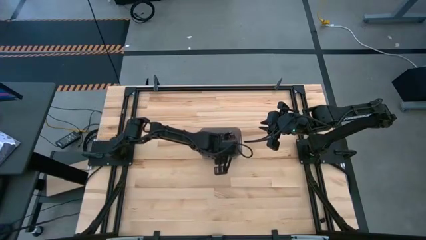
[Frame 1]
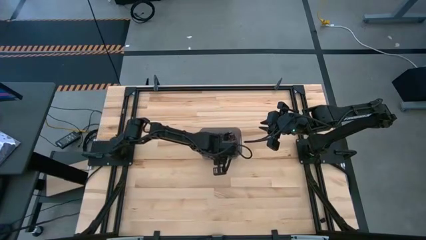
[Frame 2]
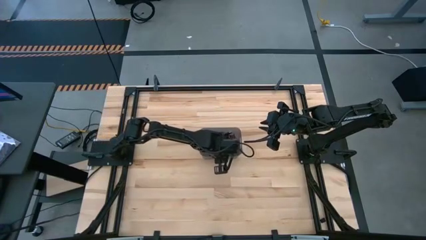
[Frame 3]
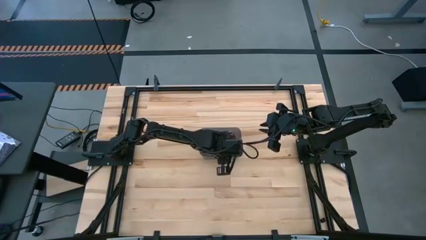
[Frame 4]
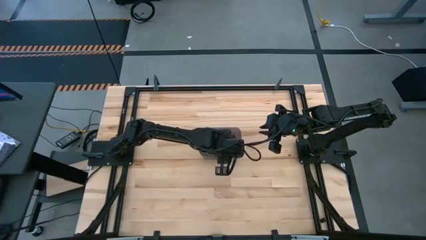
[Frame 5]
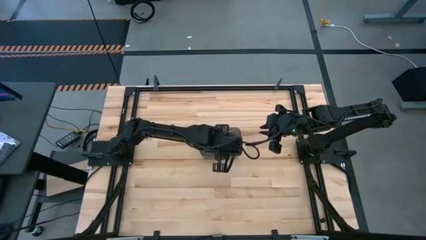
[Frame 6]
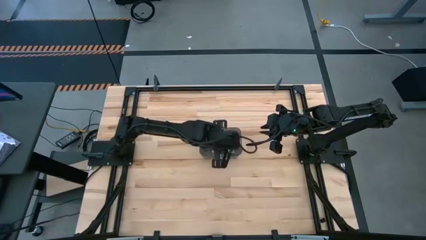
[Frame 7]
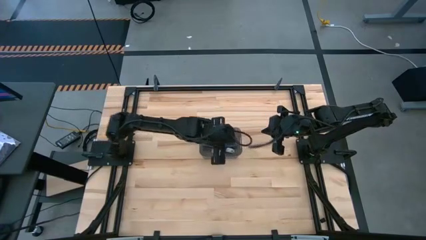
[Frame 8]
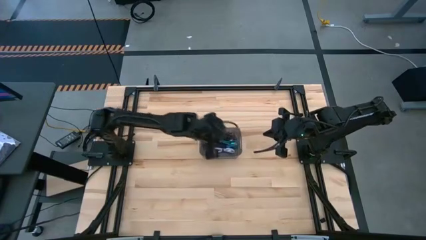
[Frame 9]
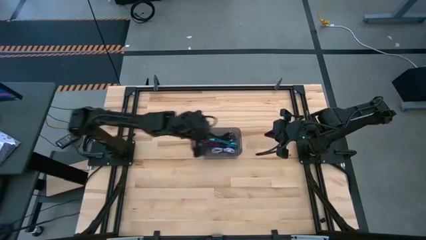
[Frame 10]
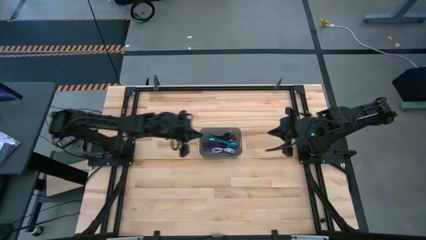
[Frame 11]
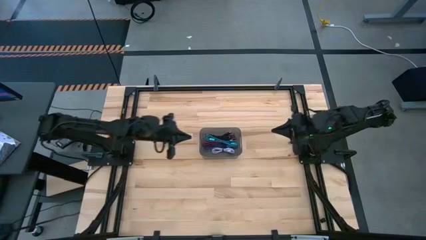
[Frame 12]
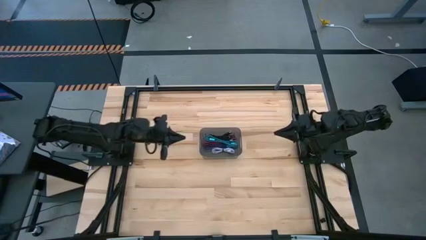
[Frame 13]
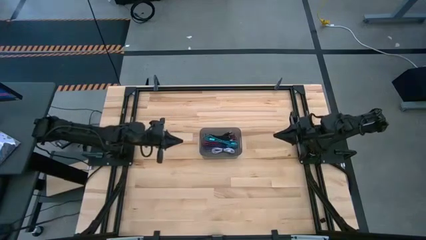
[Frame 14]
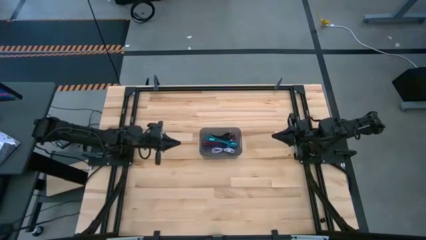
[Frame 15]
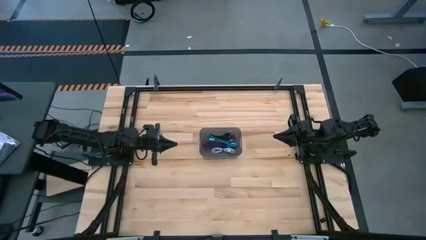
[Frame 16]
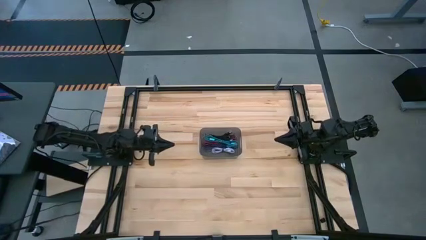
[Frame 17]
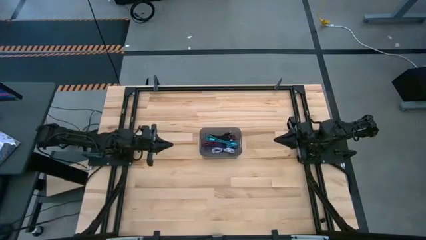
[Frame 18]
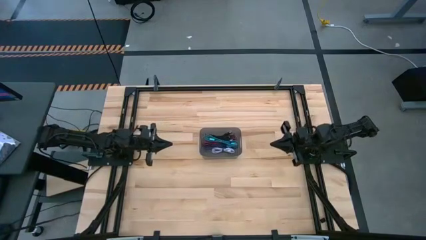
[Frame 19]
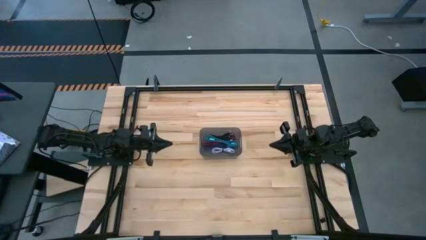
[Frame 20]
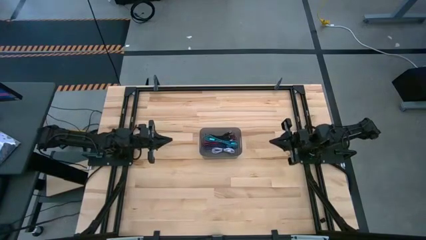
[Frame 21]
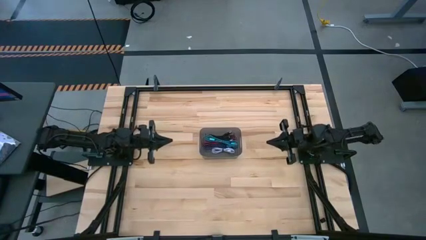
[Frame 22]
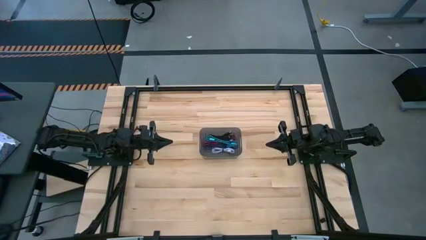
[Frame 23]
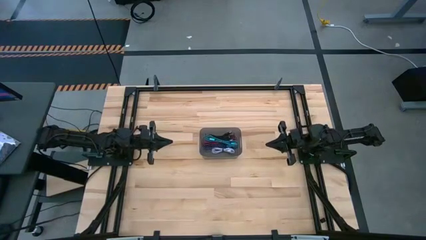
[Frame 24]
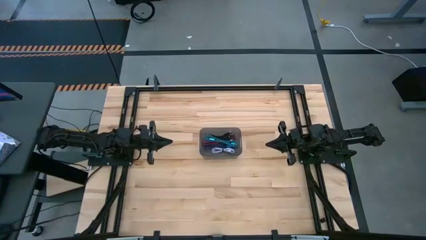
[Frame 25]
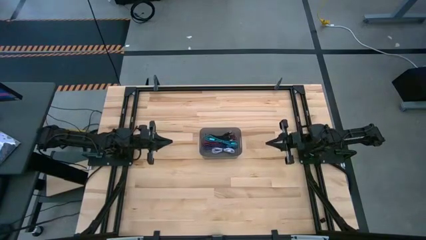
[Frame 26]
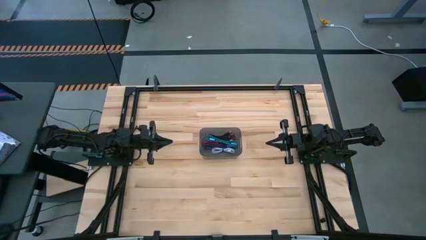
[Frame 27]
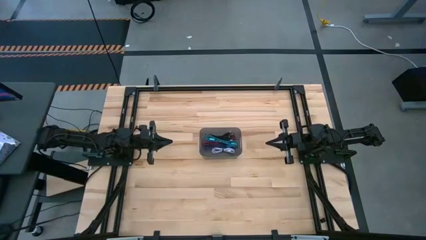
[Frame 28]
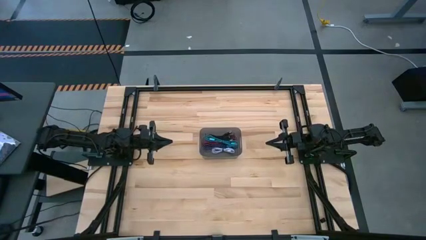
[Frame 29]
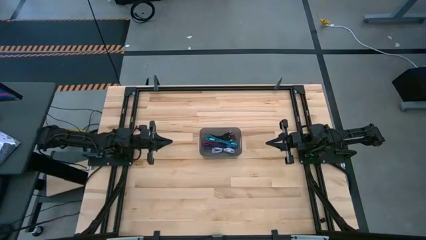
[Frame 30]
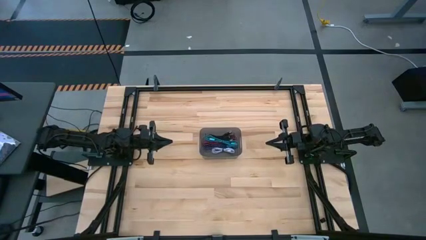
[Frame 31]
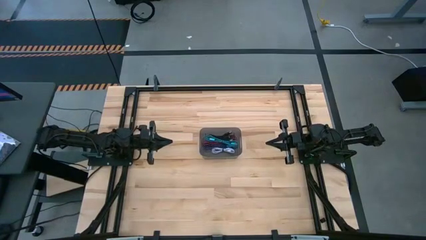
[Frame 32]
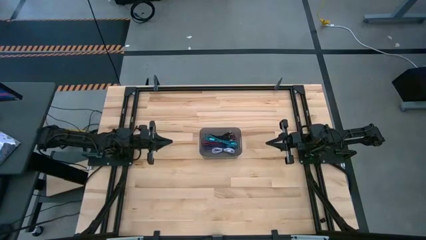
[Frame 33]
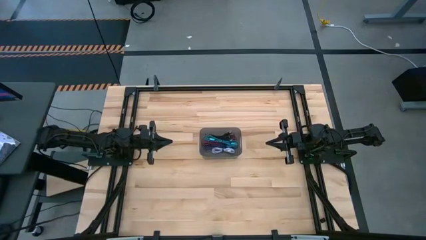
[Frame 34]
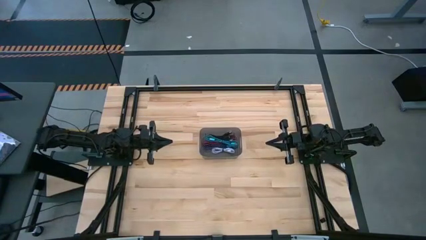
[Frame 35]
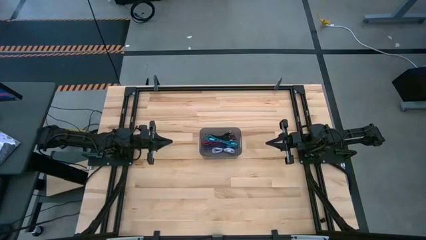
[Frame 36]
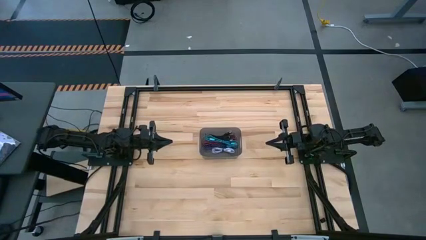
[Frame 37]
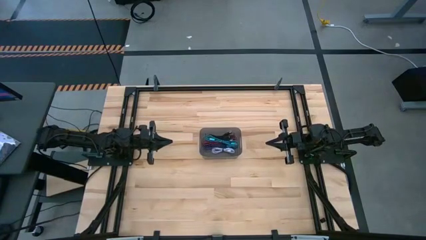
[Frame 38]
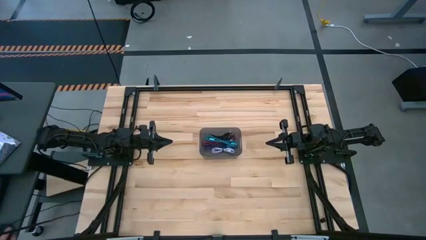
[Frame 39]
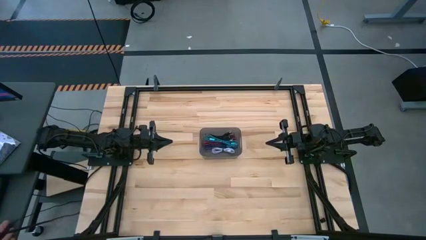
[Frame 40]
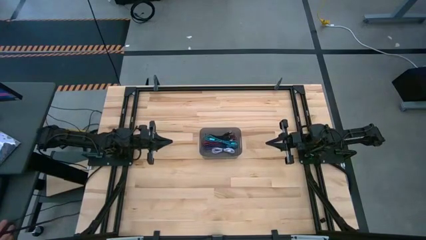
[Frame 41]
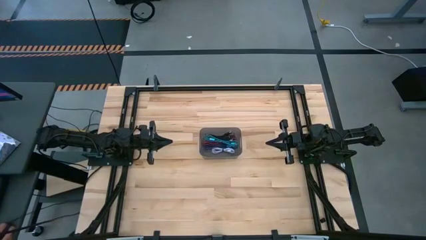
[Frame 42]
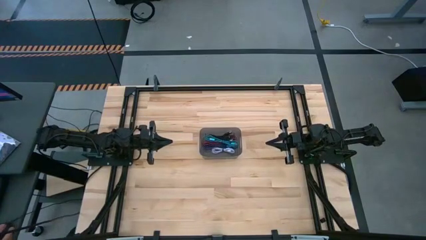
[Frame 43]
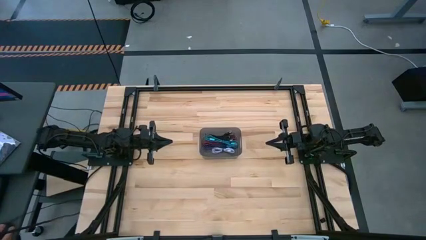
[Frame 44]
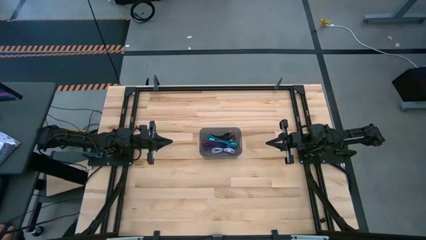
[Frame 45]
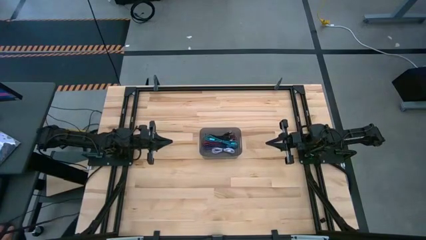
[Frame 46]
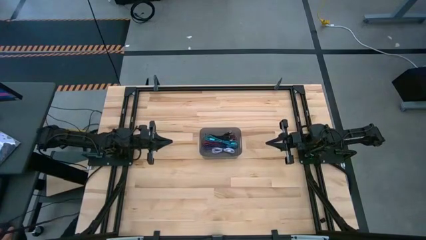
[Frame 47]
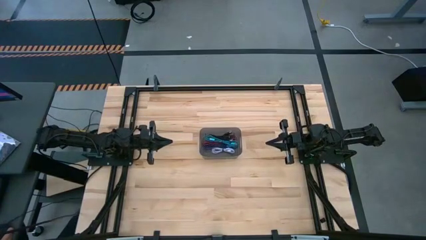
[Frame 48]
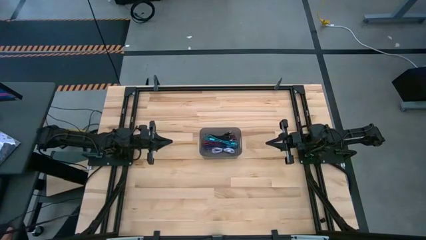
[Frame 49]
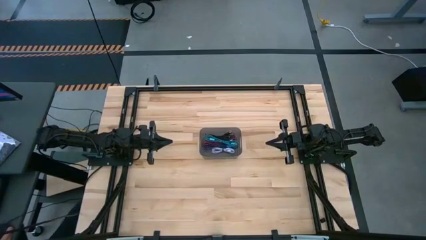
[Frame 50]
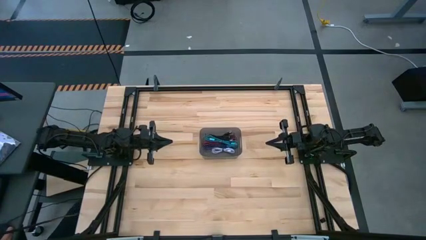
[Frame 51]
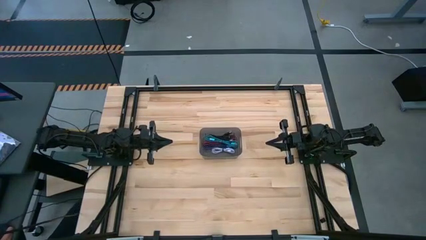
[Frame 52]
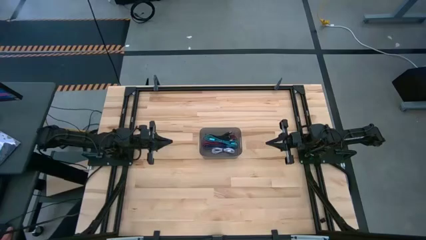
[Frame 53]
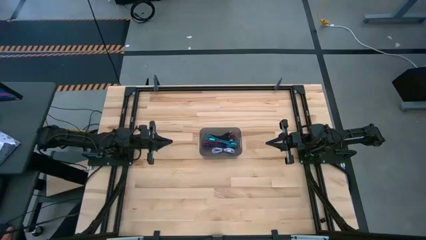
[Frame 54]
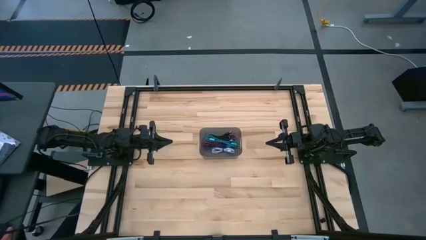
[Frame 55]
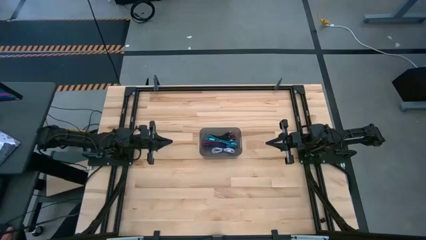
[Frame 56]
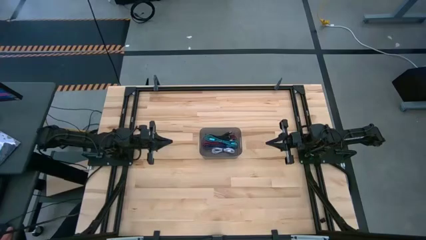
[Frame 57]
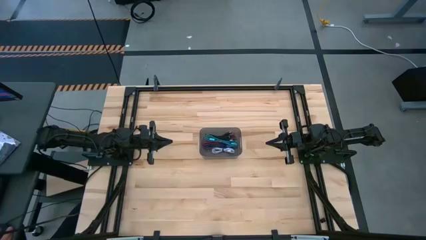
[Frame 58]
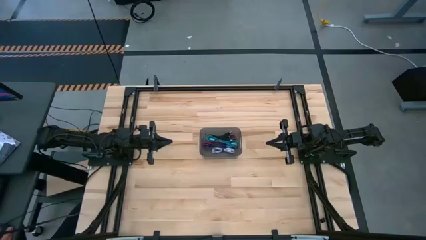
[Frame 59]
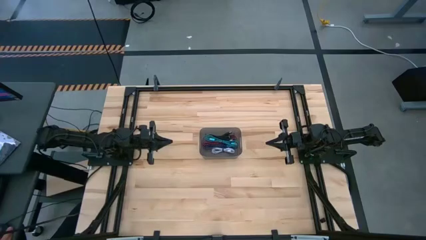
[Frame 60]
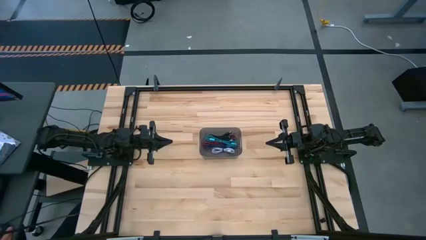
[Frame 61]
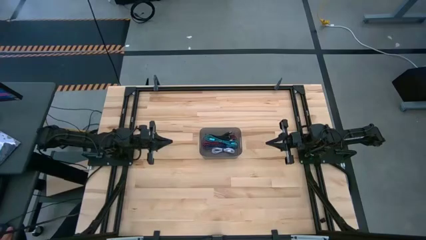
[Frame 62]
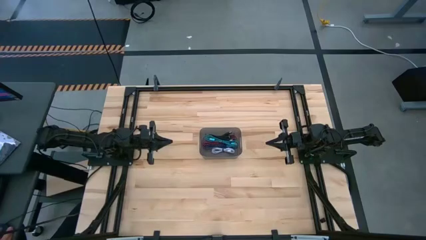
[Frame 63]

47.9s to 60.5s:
Task: Pick and place USB-C Cables
Return to Home Position

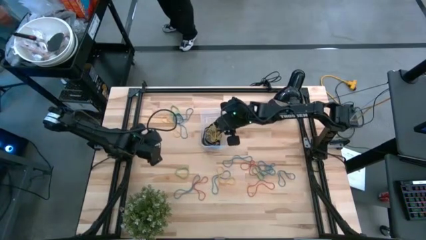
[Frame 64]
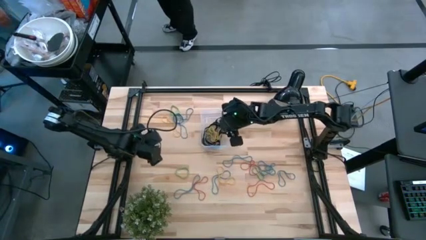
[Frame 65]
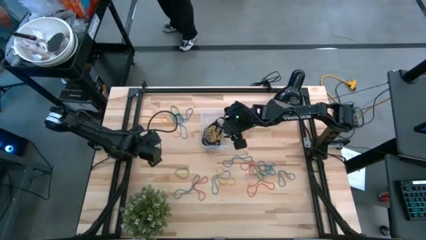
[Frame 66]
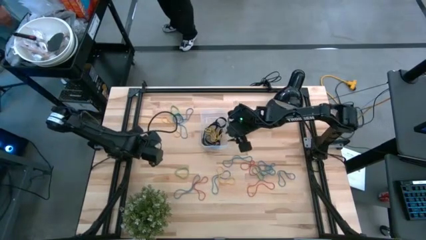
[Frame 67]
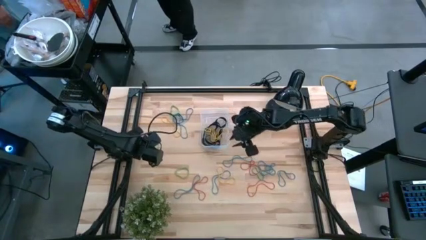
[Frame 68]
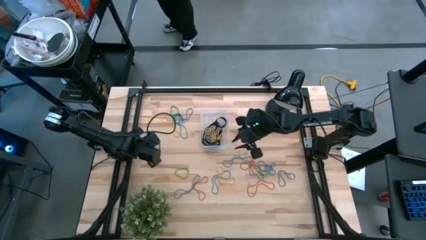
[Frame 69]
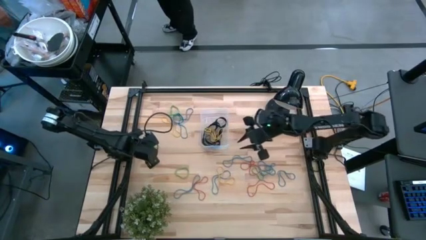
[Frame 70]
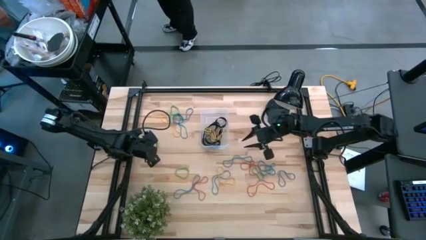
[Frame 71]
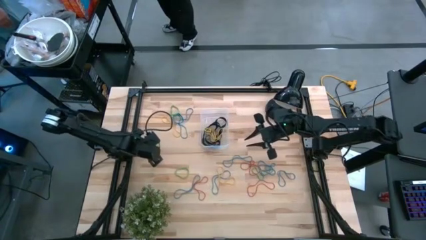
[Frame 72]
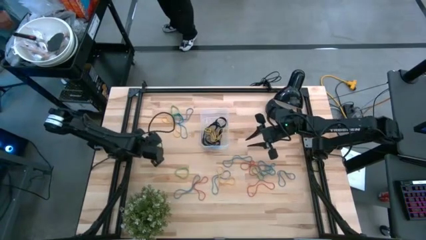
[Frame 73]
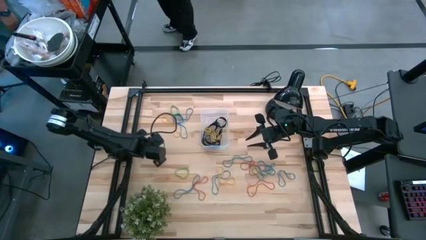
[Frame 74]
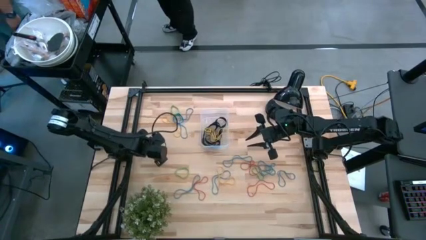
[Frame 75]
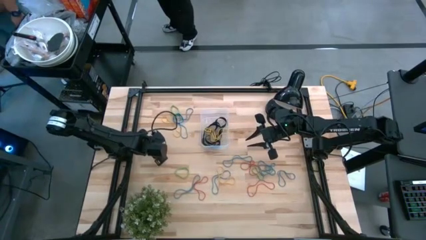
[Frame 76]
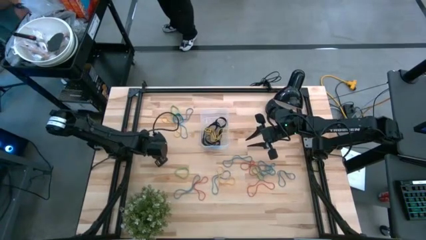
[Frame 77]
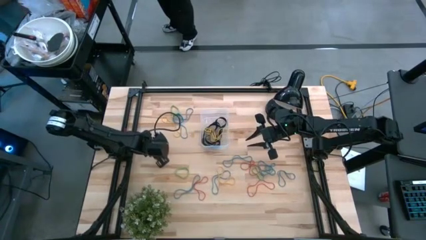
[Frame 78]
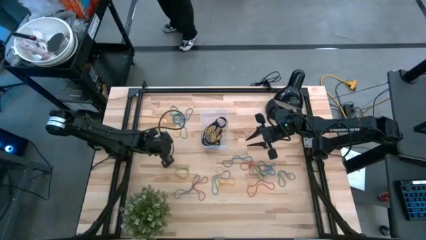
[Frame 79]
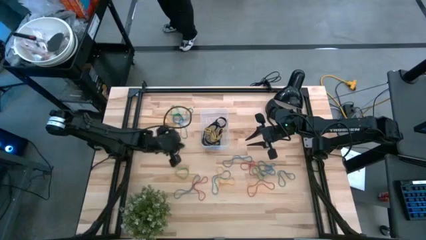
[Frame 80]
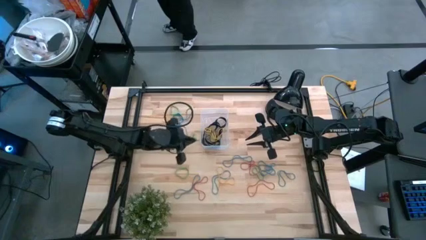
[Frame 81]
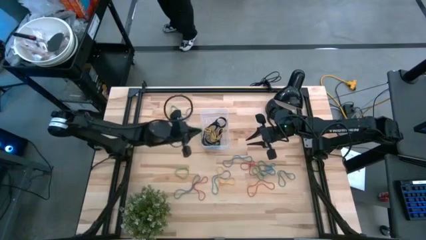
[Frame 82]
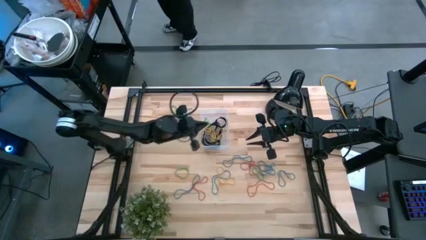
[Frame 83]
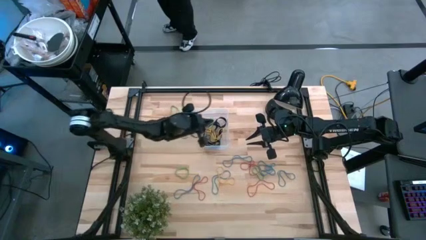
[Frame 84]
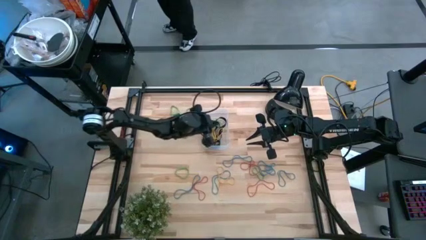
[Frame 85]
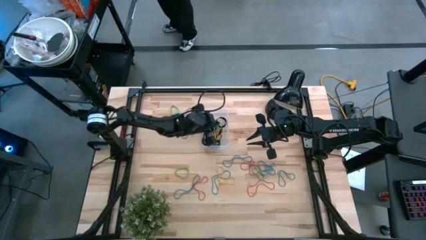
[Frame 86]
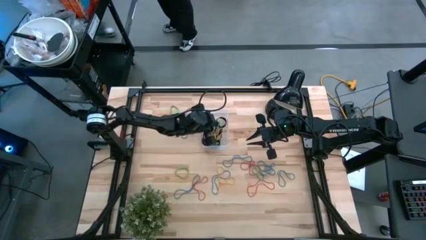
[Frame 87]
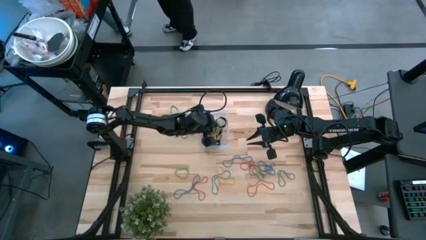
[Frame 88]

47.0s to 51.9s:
Task: Pick and place rubber bands into bin
Put the green rubber band into the transparent bin
